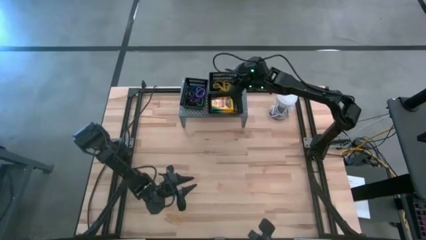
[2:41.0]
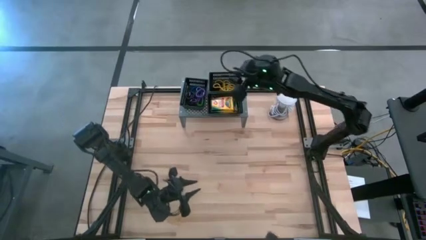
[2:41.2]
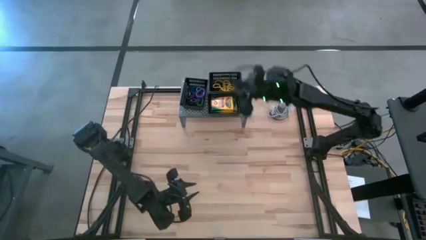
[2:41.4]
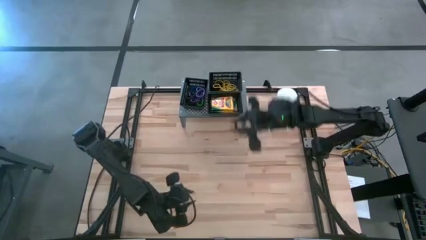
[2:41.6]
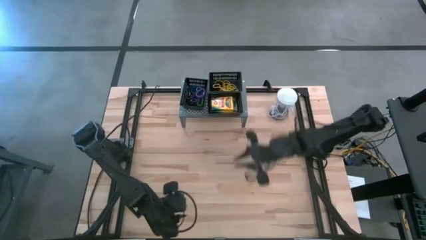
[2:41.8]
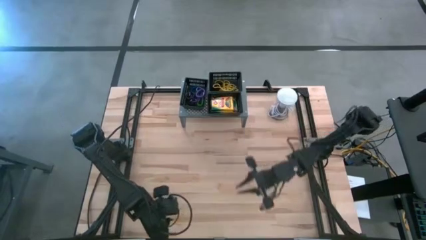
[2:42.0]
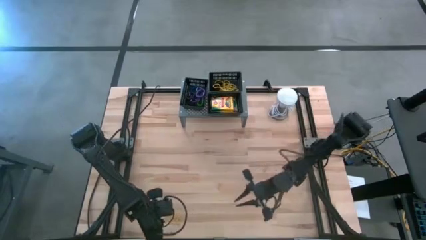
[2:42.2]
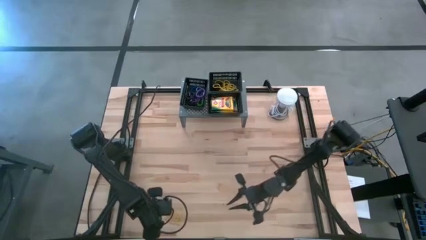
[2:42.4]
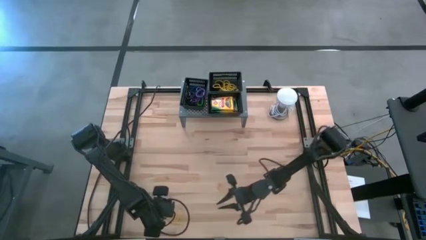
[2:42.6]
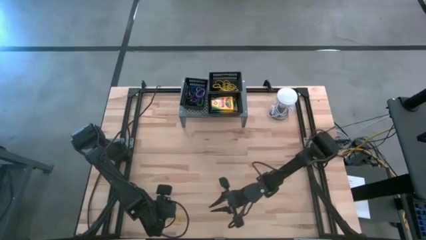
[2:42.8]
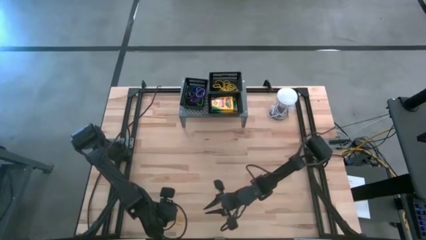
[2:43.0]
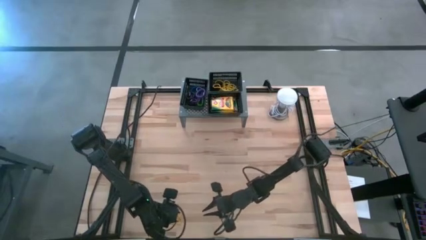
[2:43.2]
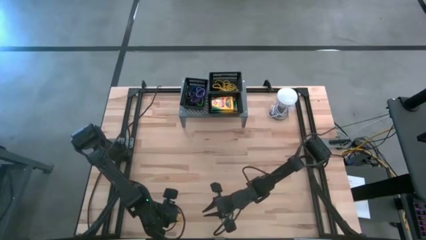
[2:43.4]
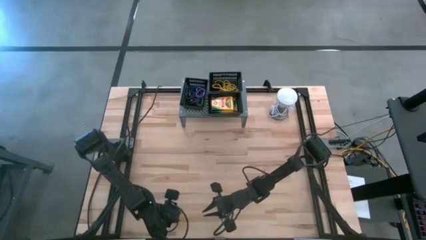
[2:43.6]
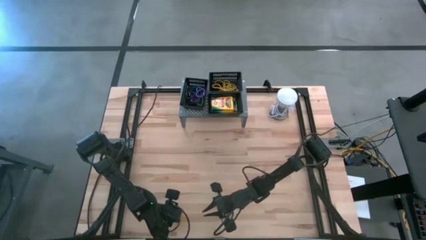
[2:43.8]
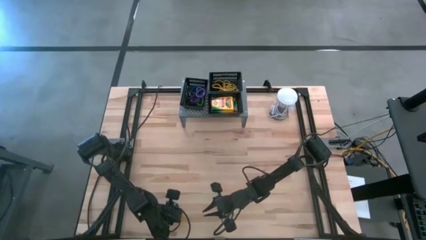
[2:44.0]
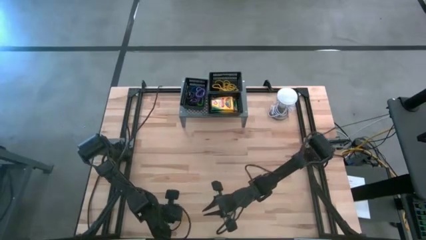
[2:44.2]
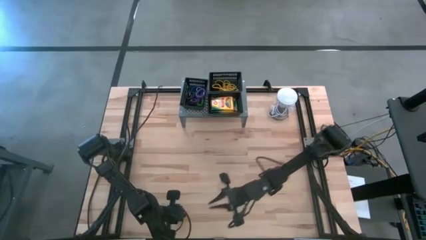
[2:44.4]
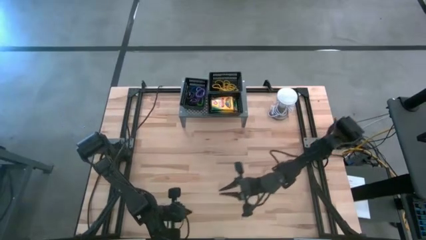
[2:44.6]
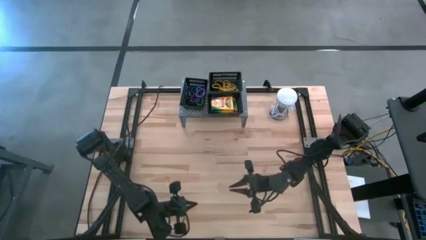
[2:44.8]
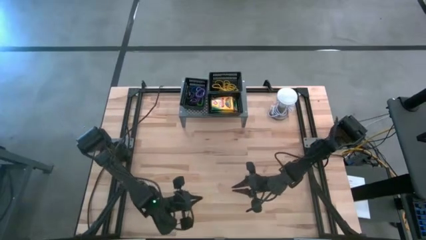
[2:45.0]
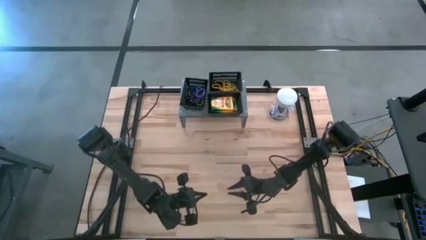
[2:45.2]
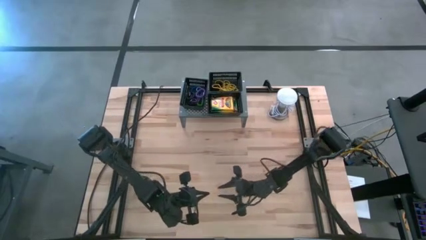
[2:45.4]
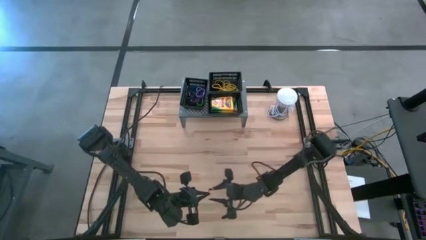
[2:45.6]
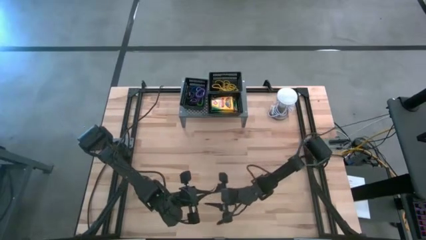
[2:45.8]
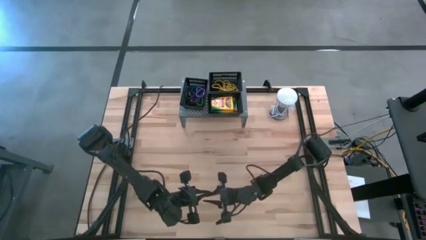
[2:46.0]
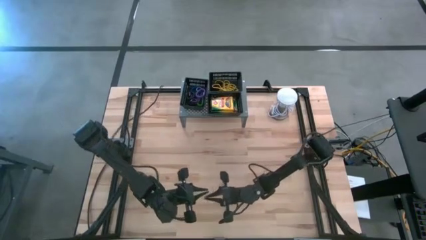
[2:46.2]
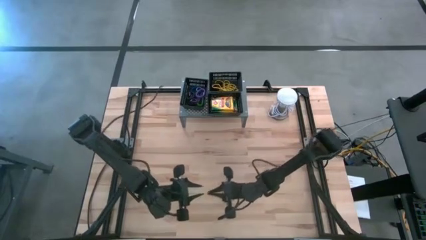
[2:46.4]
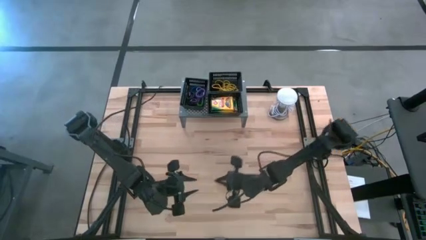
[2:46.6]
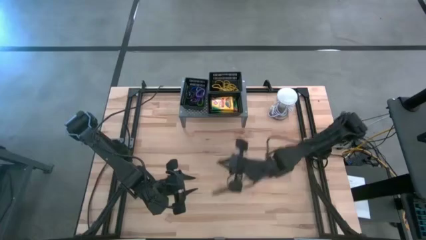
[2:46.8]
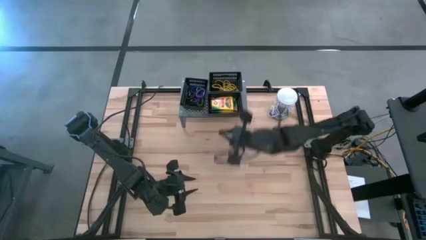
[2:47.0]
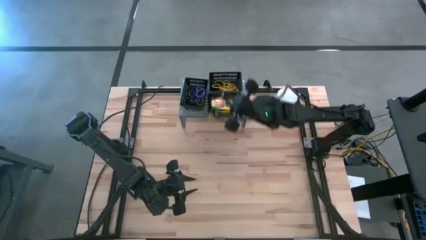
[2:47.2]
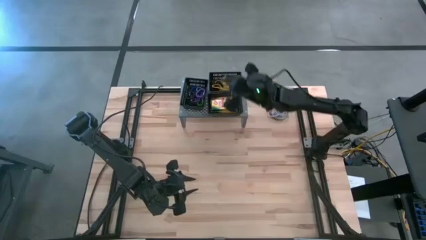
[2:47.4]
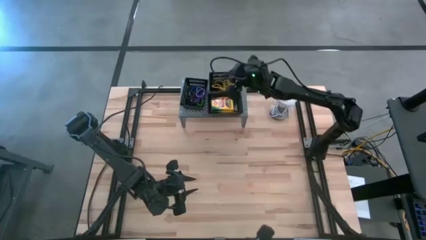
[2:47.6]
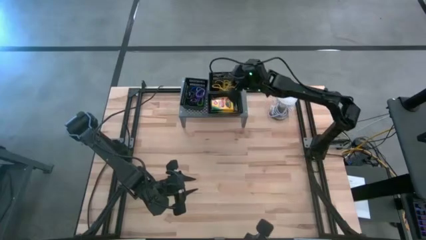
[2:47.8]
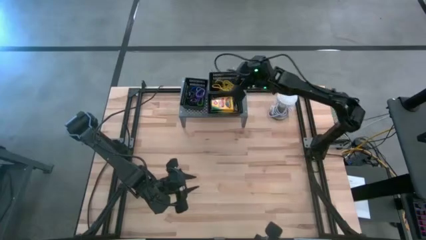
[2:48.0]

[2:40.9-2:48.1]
Task: Pick & Place Office Desk Supplies
Put the yellow rubber band into the top black bin on the shelf

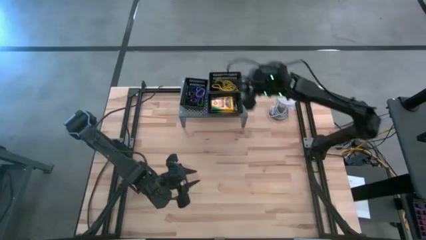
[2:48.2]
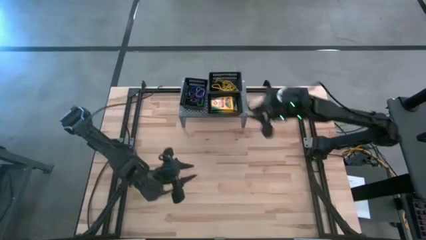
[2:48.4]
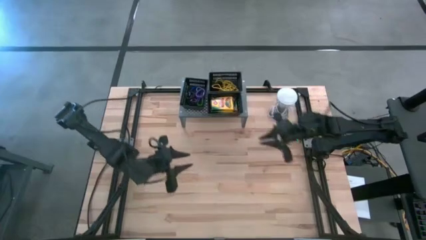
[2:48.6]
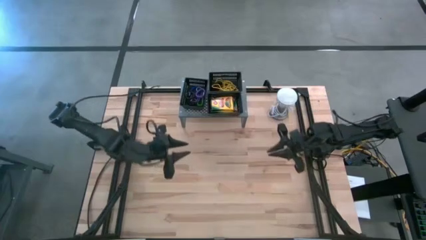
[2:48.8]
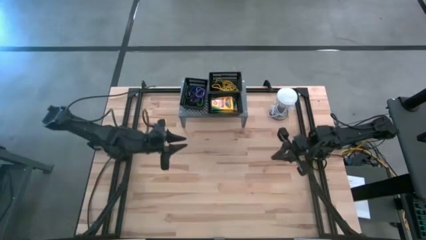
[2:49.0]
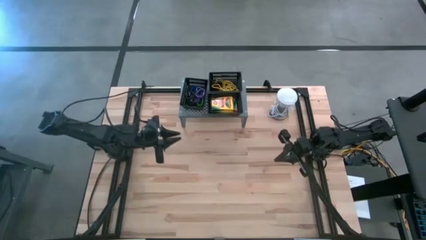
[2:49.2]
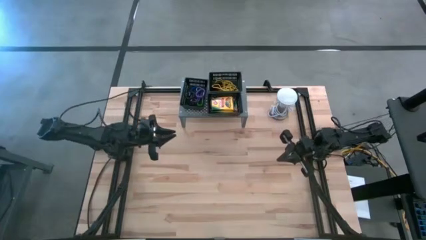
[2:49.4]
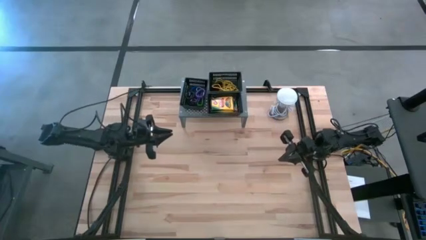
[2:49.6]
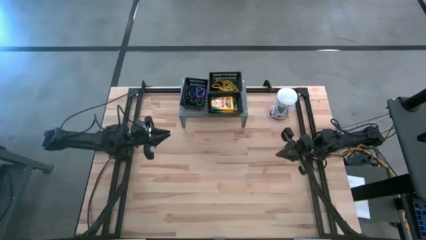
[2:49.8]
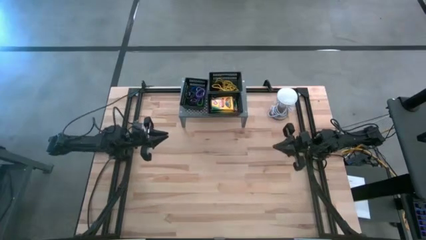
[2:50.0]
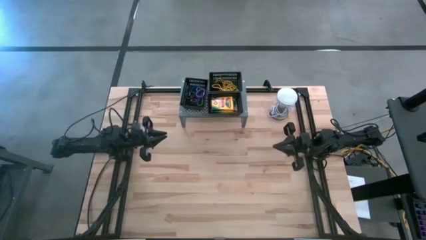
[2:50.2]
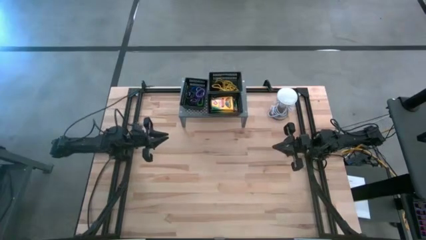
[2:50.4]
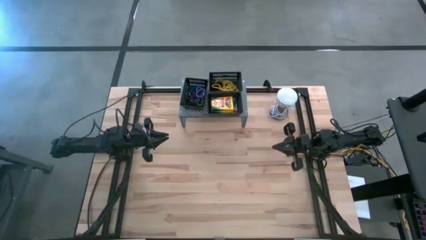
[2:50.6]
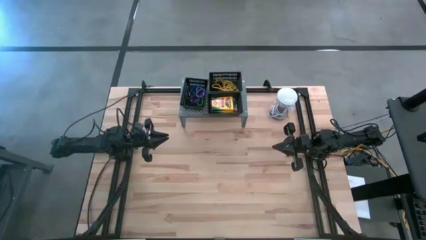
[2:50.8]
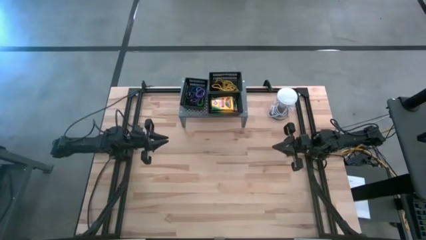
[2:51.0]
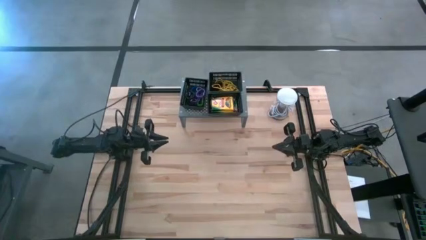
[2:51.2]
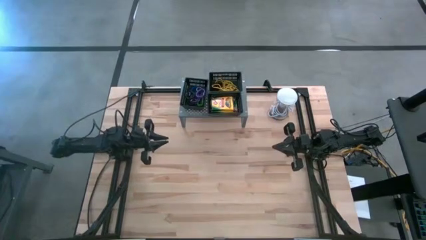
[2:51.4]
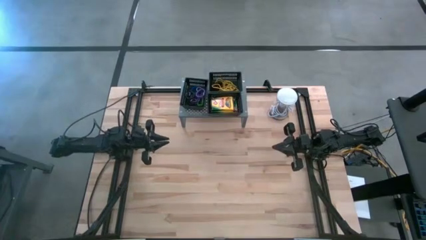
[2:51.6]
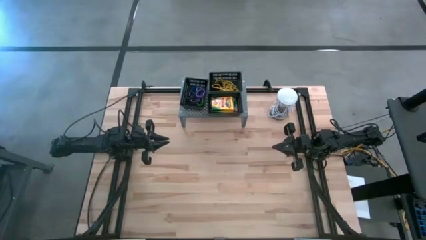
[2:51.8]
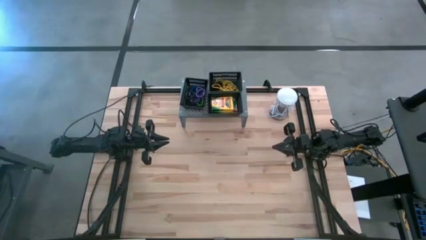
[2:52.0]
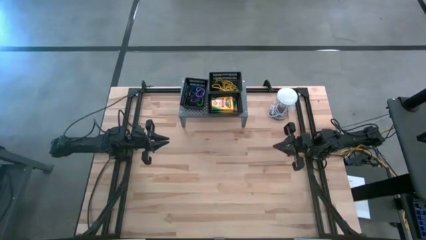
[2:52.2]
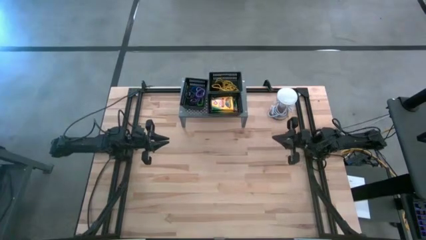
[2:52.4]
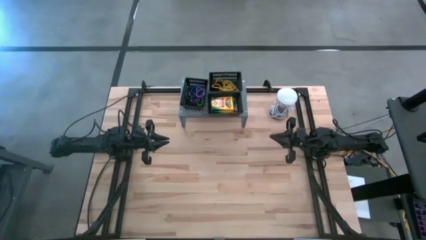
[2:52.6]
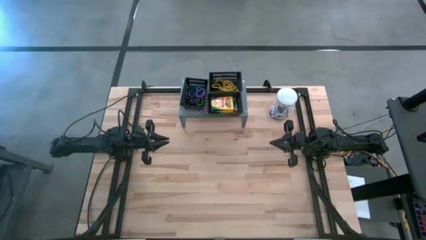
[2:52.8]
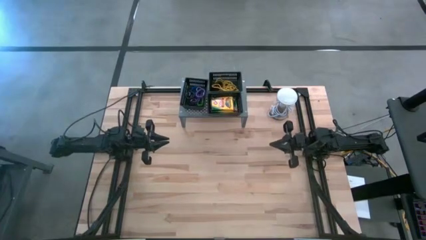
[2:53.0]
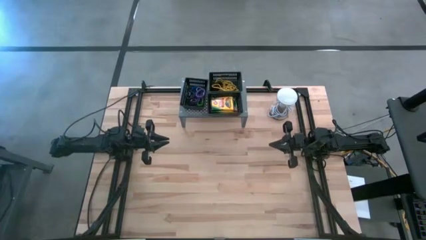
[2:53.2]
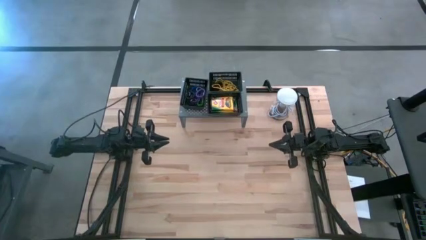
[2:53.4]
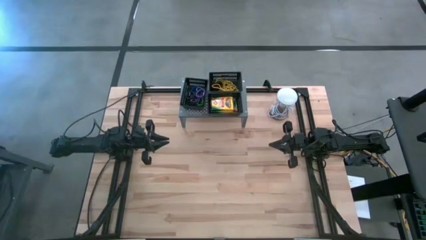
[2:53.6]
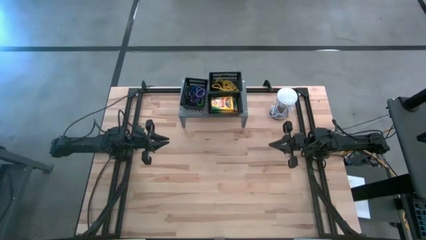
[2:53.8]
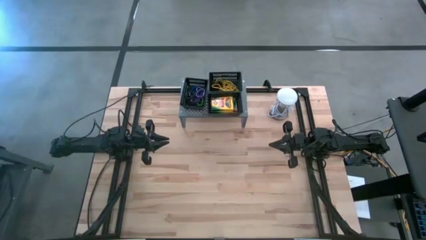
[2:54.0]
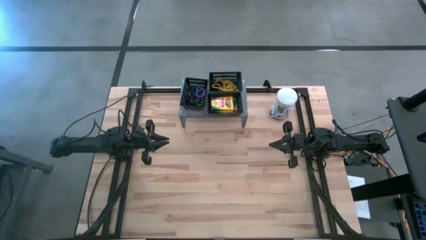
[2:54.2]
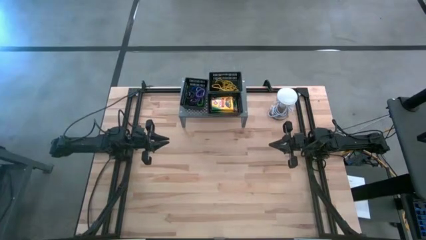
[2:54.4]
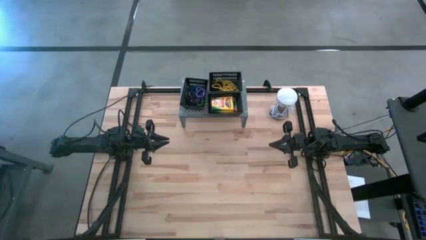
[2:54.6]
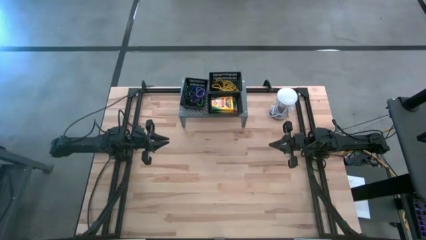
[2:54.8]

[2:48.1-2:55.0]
Return to Home Position

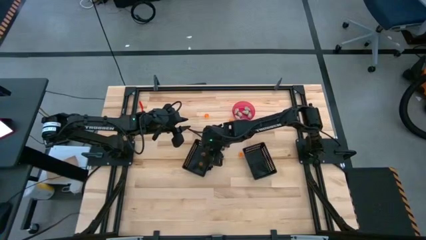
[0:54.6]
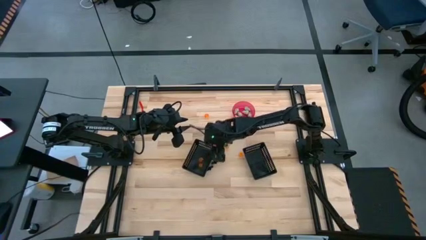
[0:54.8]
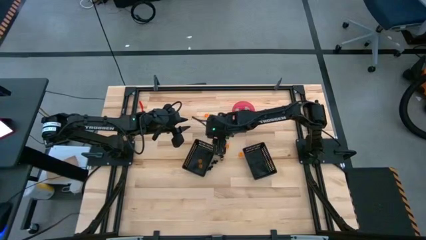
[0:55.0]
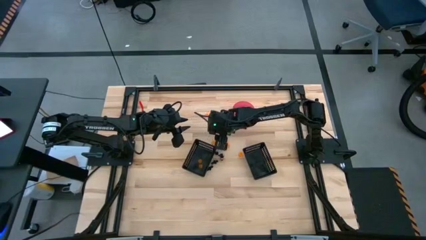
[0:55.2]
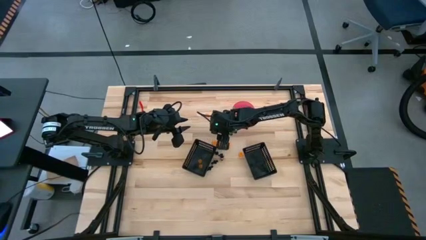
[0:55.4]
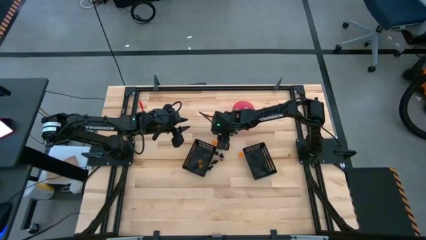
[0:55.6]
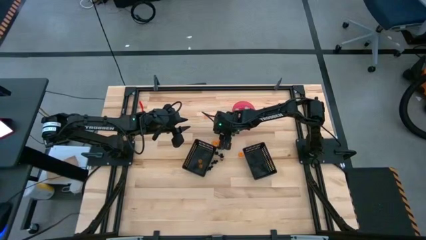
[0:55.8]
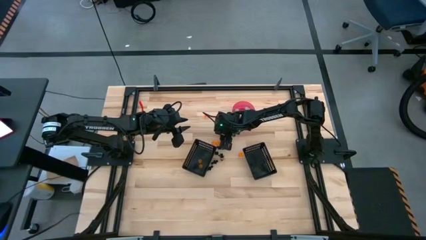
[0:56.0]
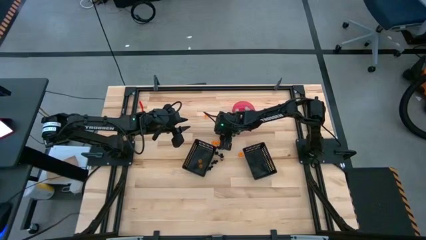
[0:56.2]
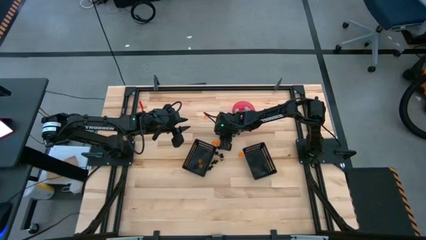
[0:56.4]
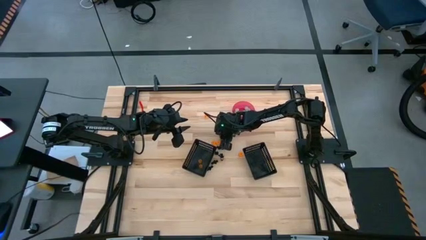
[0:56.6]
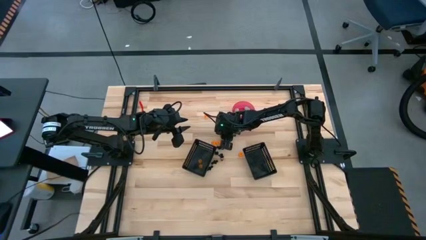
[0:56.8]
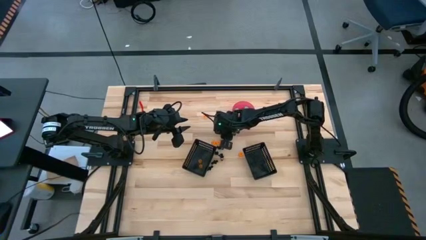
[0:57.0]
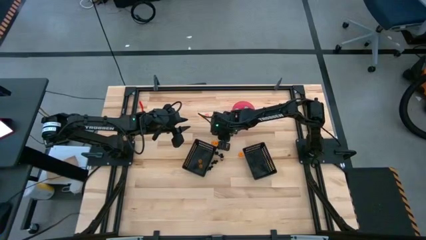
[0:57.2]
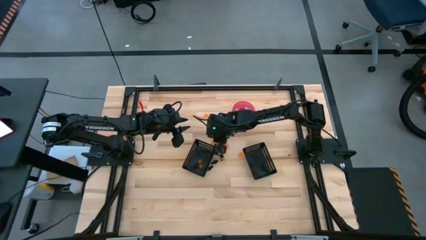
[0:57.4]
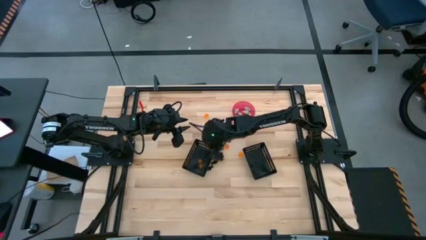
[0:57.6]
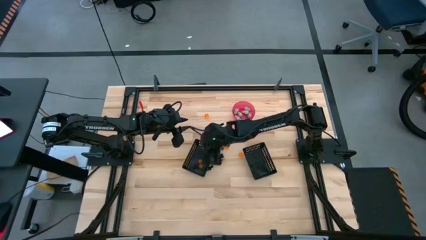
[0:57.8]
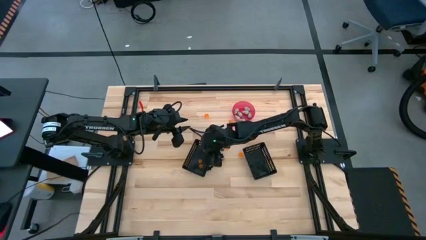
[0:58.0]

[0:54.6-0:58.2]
Task: Sort Halloween decoration
Put the orange pumpkin toy into the left black bin
